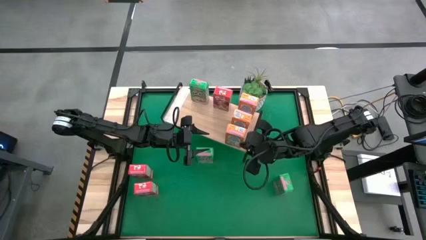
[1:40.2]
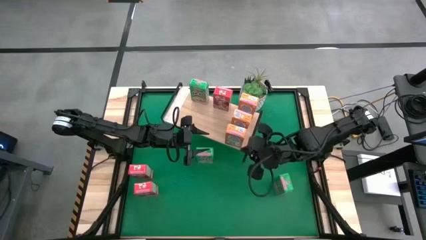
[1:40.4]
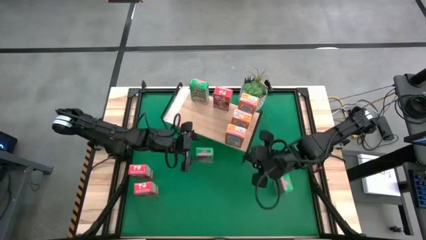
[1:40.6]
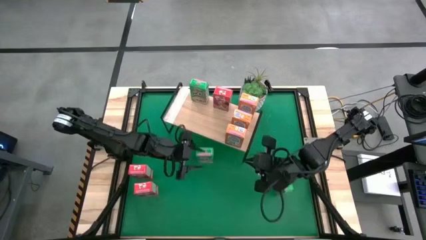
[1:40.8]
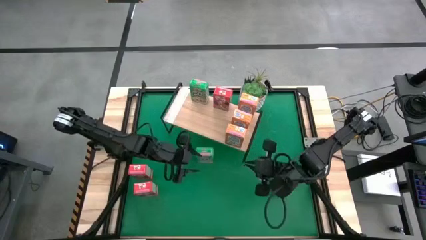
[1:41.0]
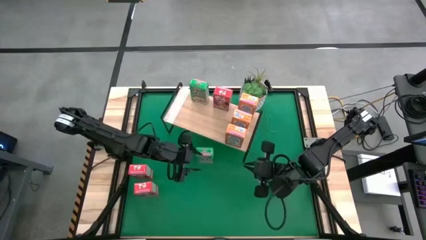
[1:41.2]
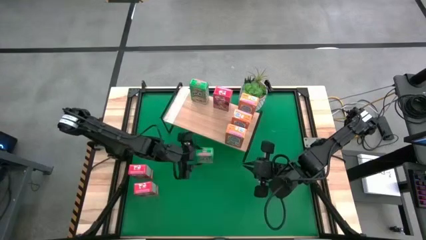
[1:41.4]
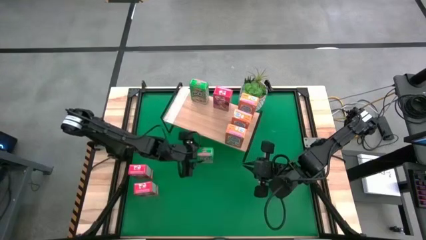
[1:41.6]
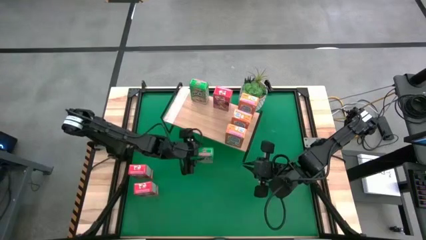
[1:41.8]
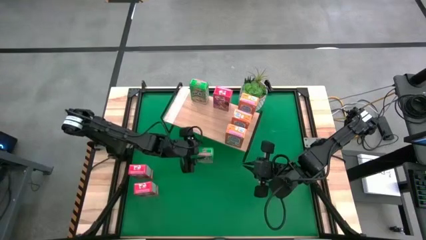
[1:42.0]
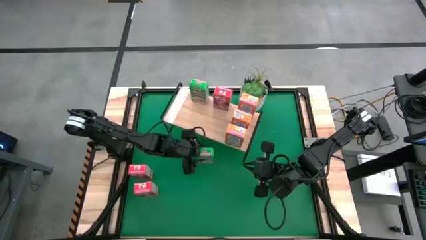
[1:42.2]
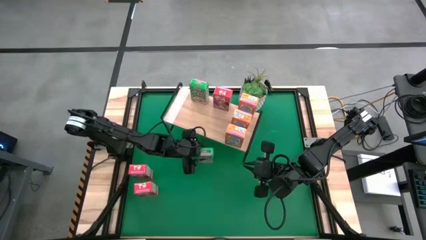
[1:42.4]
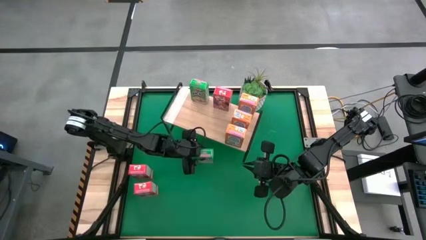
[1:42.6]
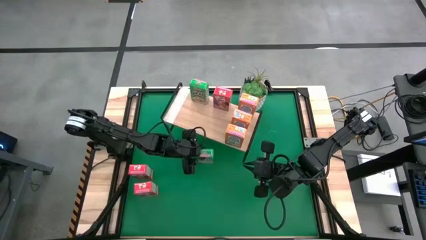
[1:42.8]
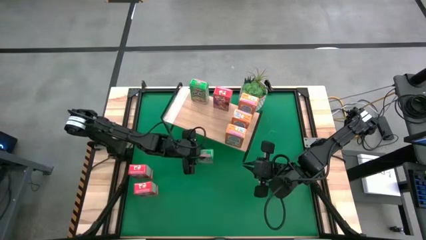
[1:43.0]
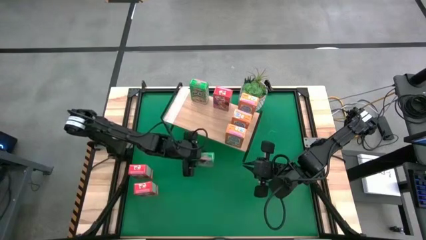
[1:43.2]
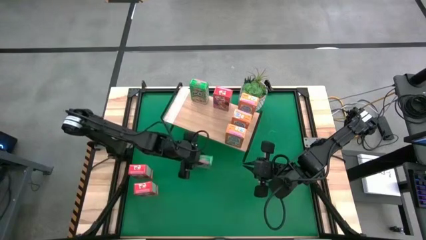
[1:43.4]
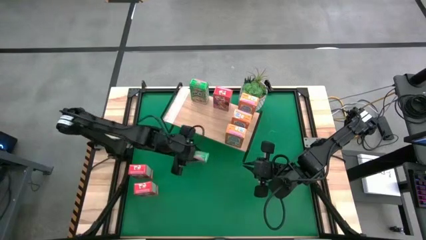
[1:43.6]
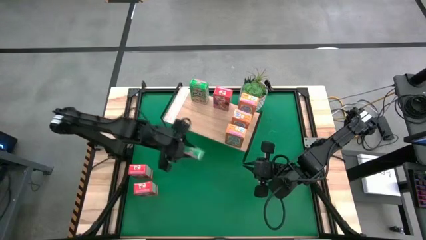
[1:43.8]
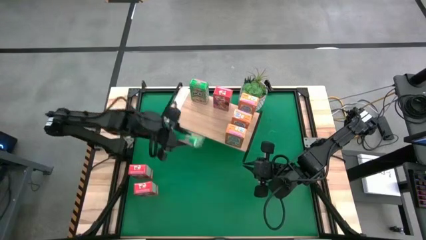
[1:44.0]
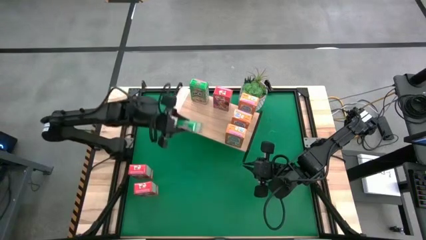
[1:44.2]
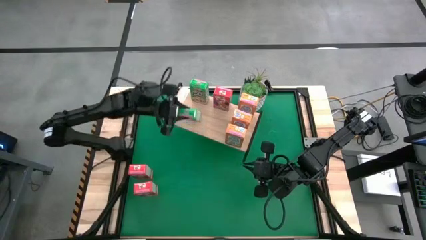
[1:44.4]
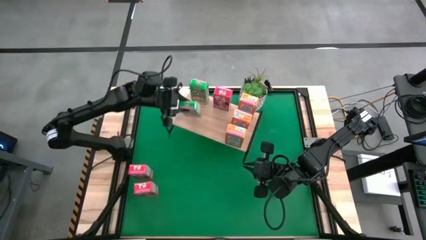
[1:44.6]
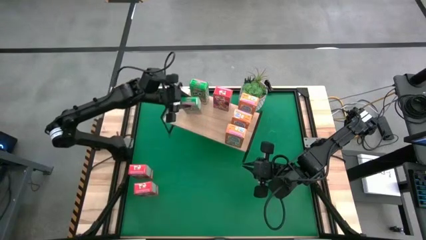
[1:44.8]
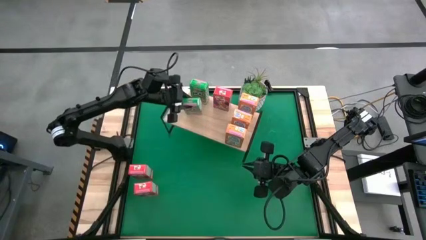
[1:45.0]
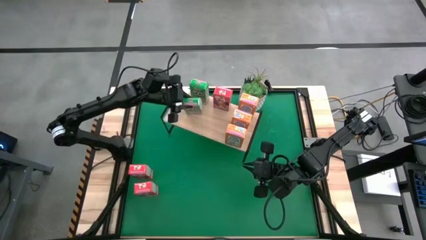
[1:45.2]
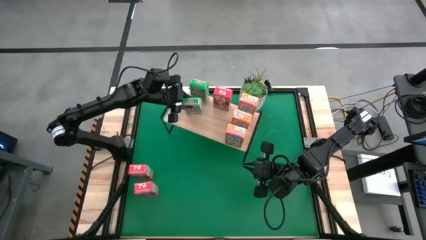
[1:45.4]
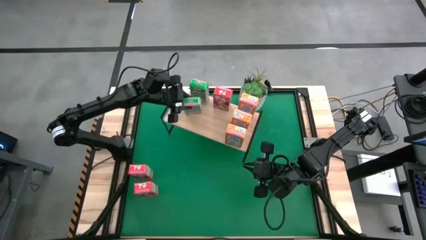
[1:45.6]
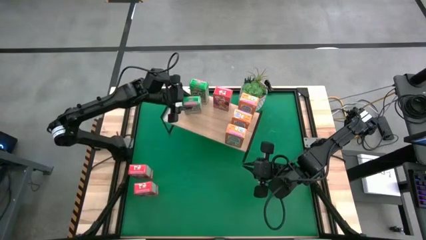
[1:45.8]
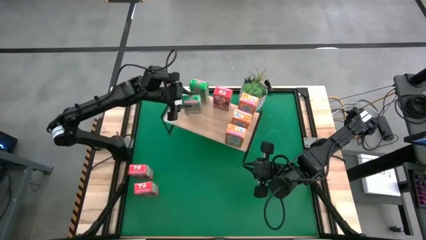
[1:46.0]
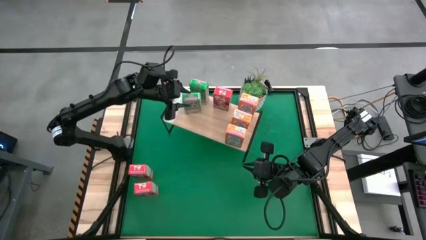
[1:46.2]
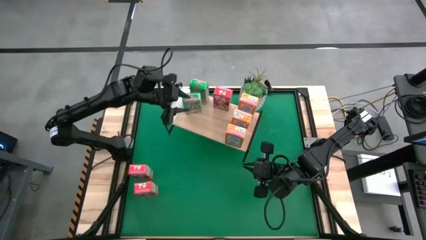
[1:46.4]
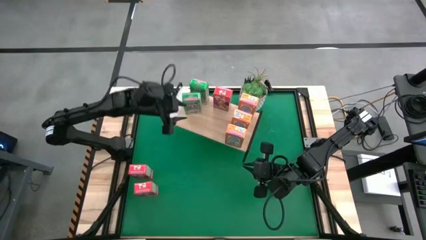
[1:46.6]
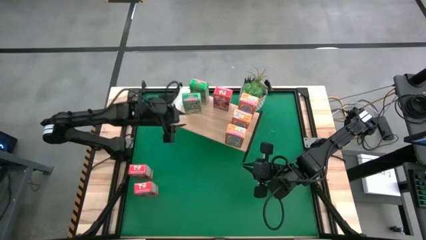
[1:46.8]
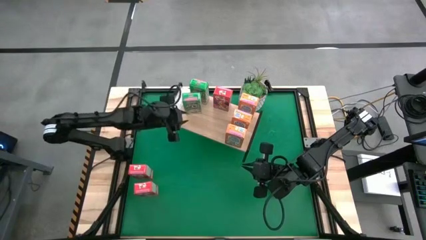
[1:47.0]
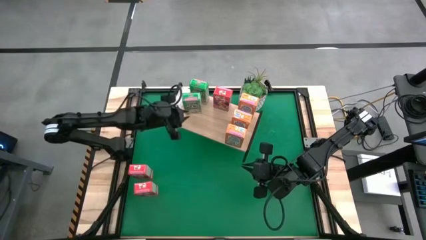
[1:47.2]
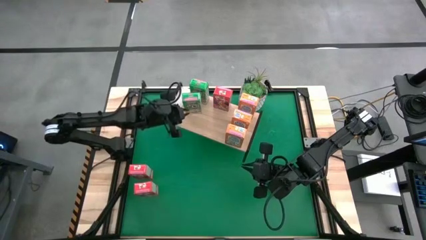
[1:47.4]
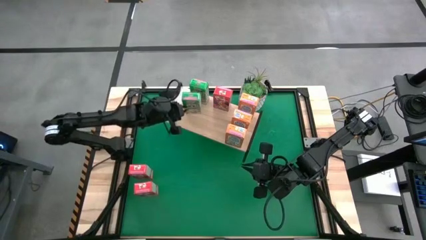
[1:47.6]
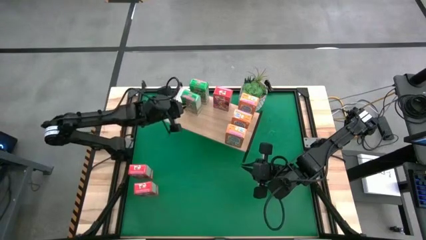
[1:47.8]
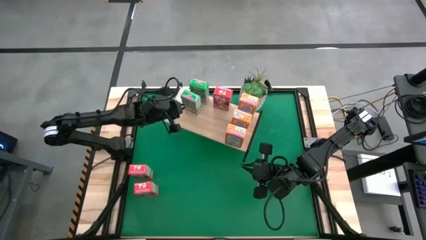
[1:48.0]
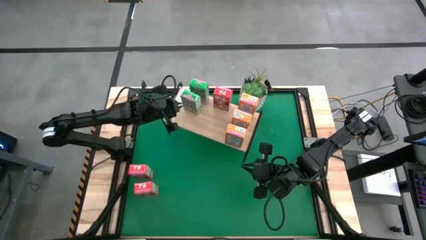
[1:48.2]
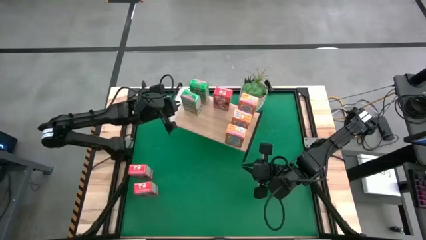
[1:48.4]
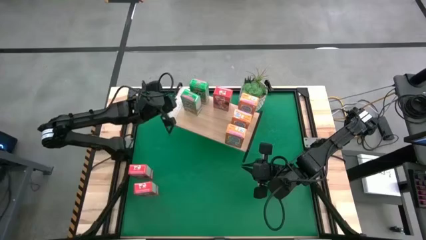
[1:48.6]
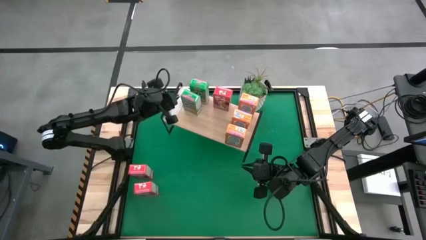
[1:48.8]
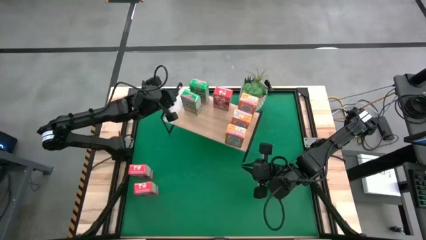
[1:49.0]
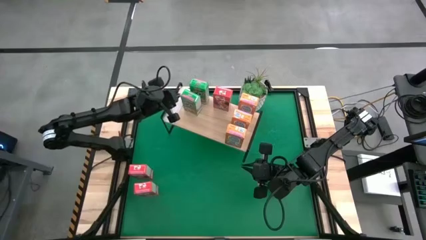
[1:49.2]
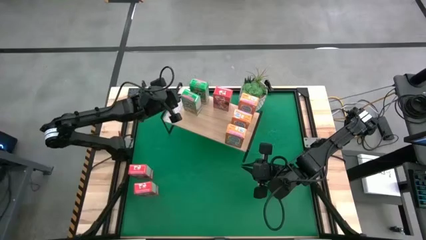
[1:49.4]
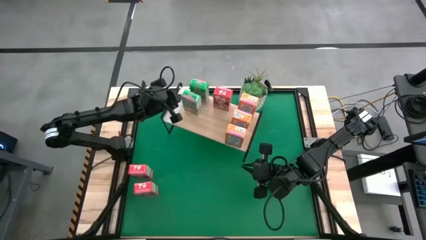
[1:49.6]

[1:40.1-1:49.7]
Task: Stack cereal on shelf
Put the left green cereal box aligned with the other orange cereal box on the shelf

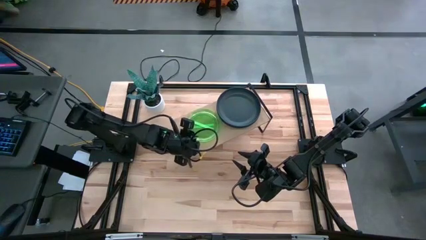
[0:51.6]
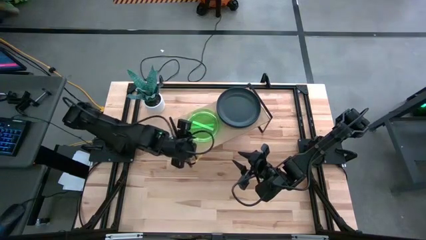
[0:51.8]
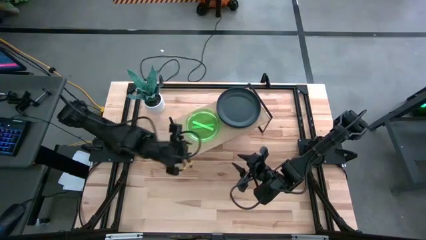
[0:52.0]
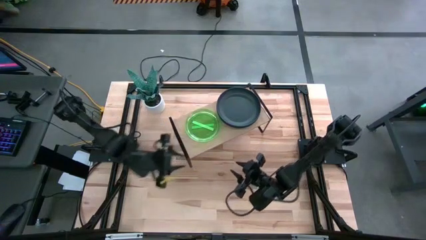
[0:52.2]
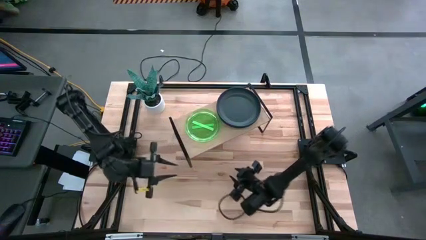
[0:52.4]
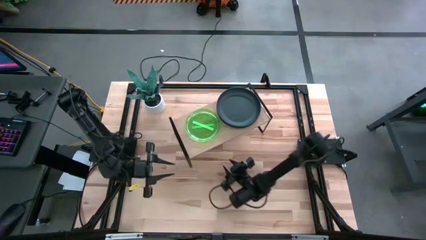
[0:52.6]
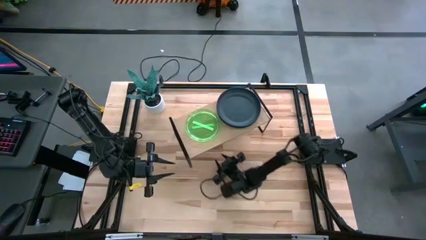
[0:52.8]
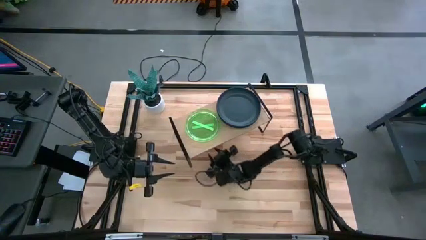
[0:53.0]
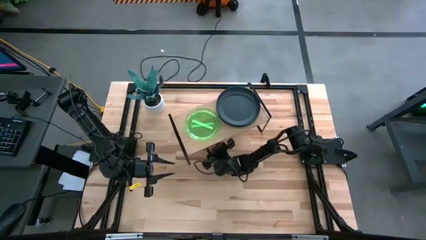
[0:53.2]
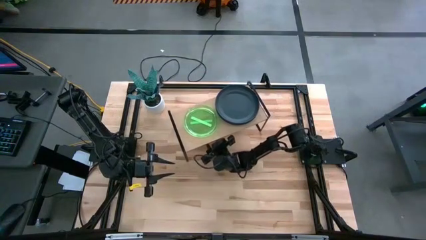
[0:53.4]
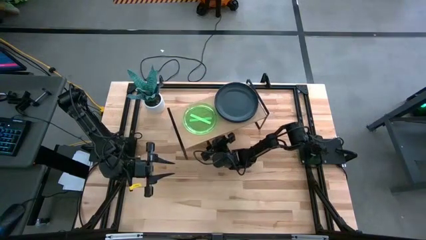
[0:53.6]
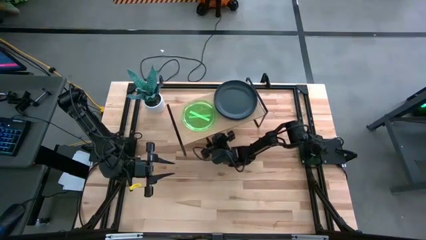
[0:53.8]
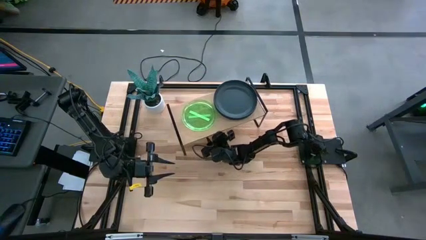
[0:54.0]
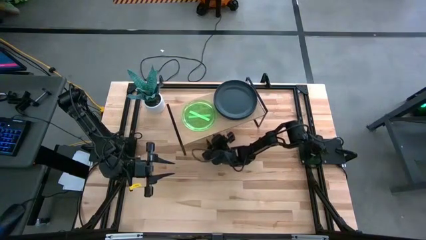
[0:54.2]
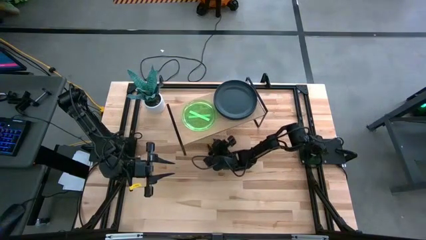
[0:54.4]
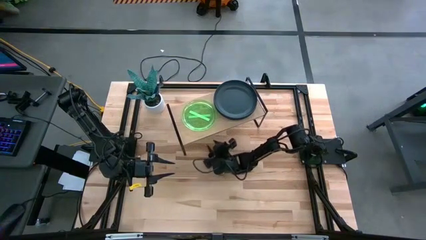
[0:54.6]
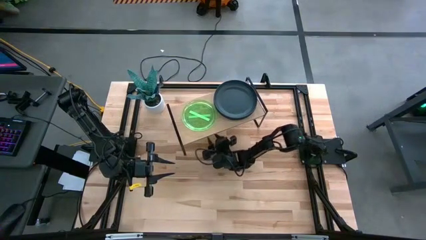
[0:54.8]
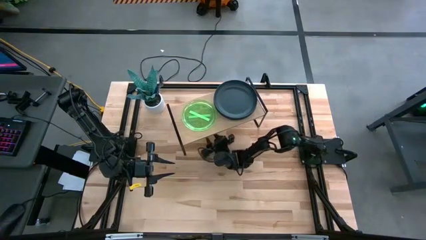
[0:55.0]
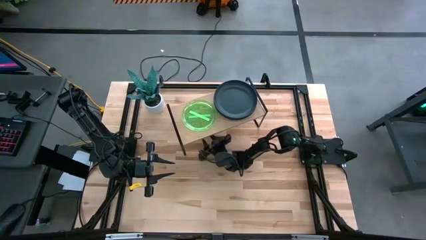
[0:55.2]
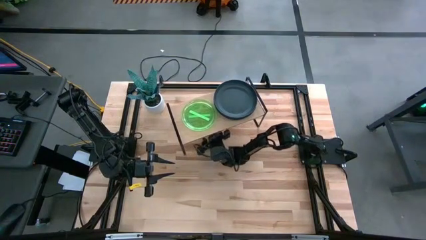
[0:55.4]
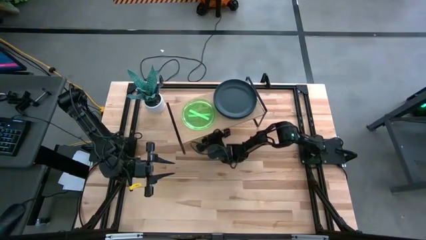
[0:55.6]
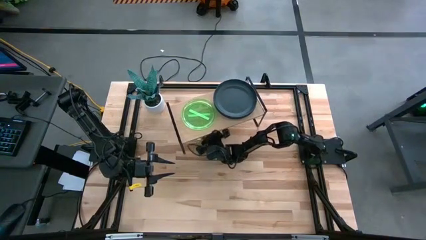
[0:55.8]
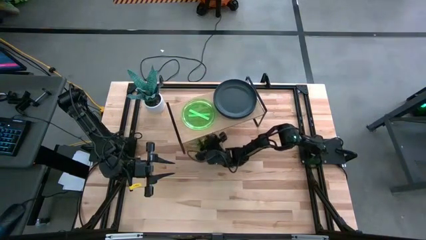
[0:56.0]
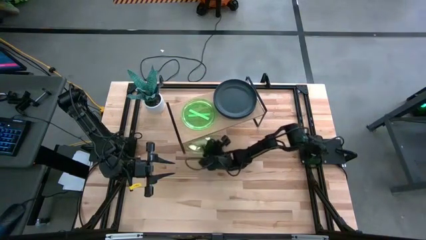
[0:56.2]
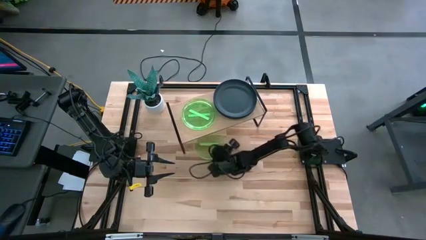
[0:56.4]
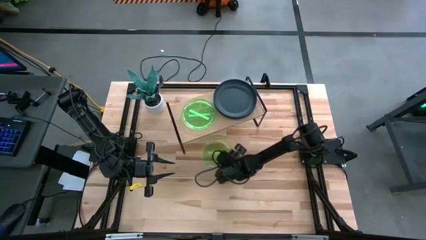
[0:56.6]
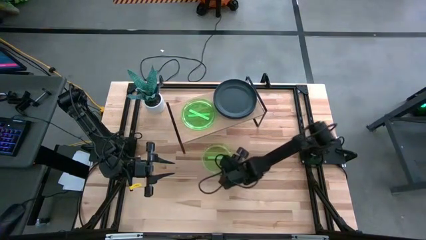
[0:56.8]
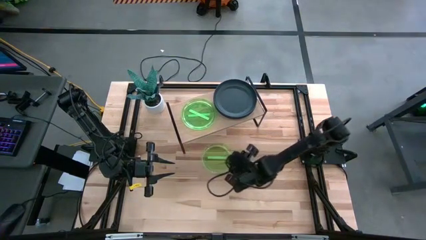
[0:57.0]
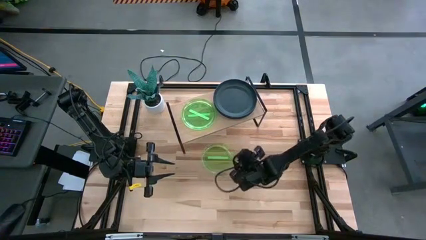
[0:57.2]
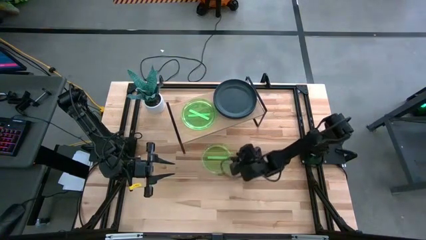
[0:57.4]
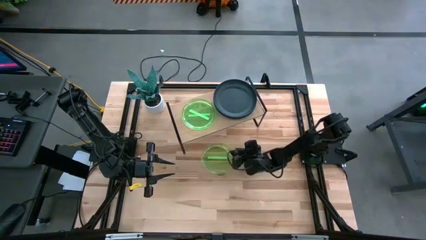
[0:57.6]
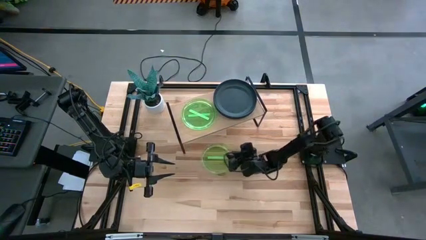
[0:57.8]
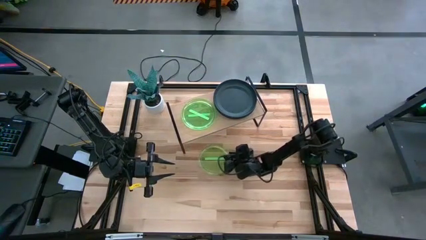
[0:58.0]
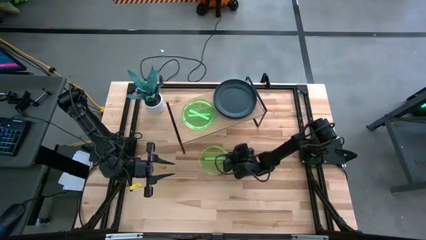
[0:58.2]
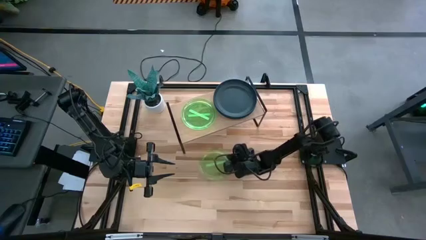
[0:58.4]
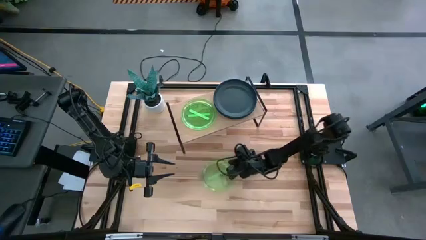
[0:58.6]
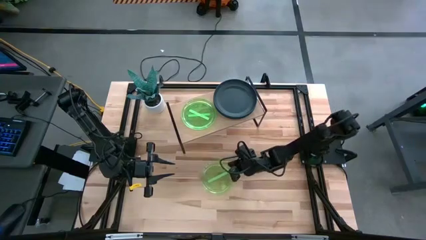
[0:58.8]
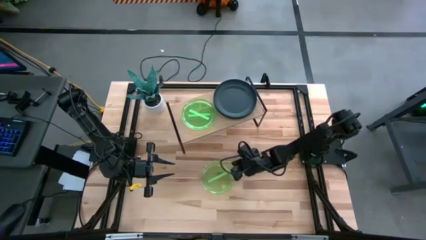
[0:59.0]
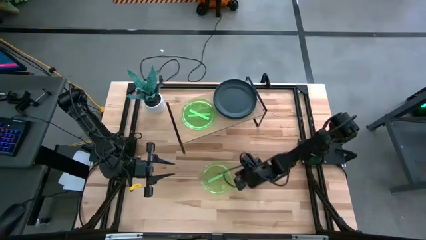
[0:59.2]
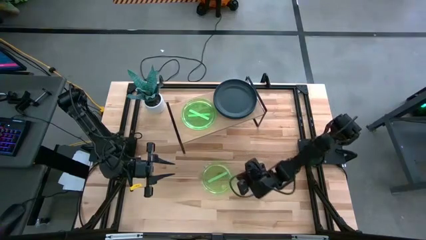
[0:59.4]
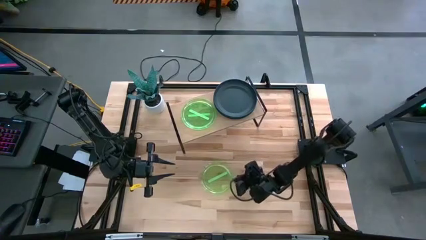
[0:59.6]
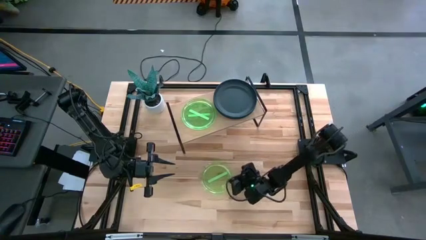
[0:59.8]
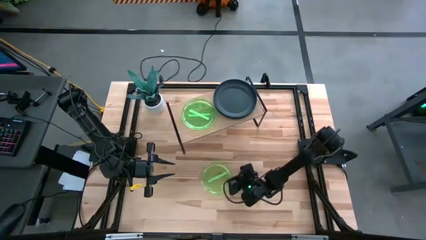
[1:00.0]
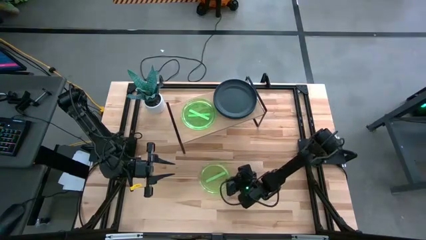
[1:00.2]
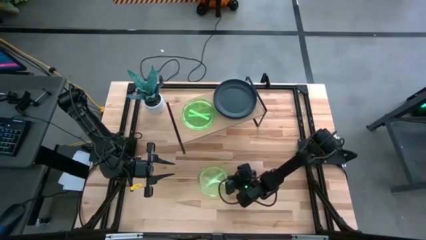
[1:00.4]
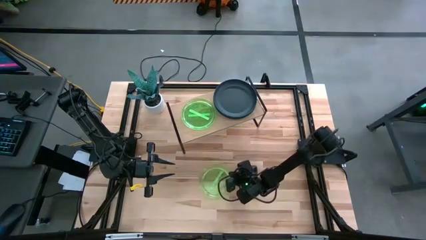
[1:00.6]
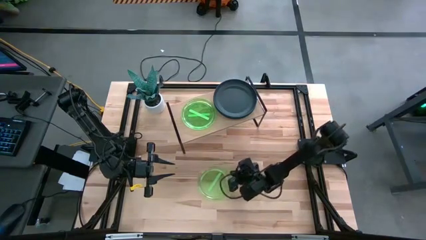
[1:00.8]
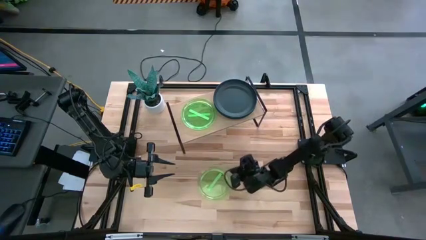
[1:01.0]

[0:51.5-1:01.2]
Task: Place and stack plates onto a shelf
Stack the green plate on top of the other green plates on the shelf
